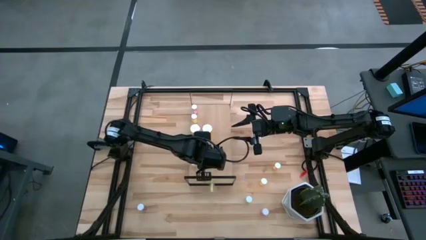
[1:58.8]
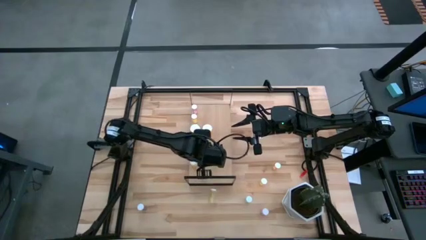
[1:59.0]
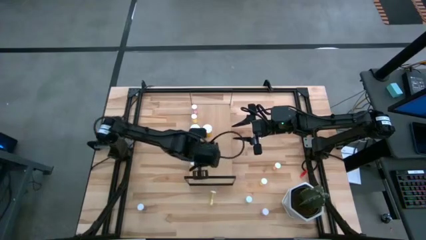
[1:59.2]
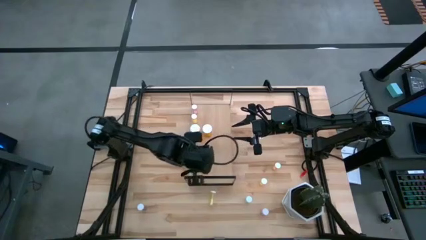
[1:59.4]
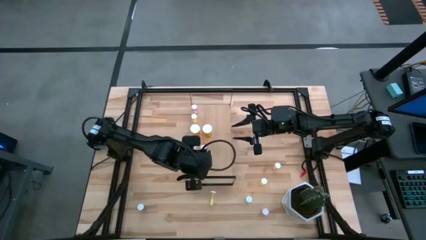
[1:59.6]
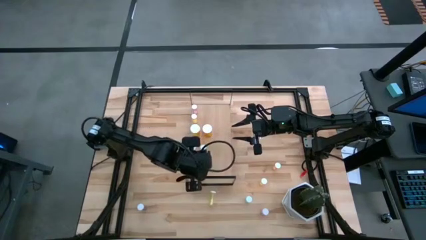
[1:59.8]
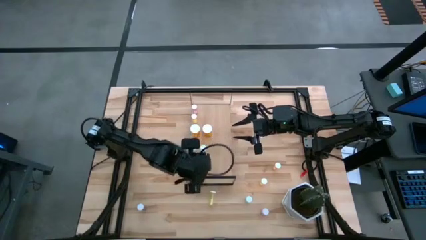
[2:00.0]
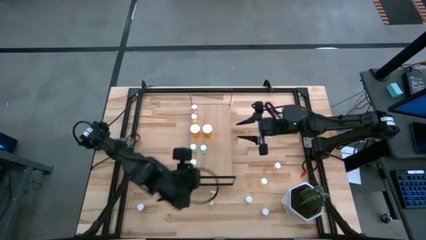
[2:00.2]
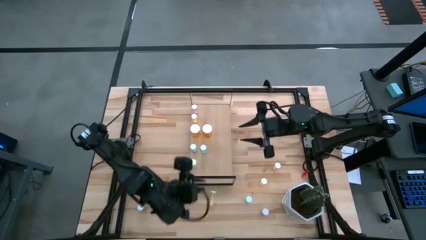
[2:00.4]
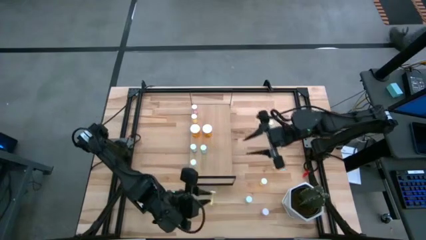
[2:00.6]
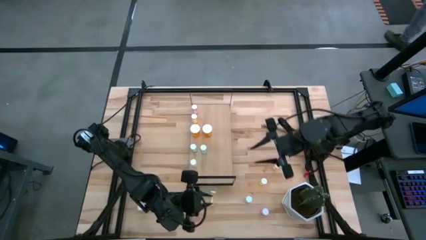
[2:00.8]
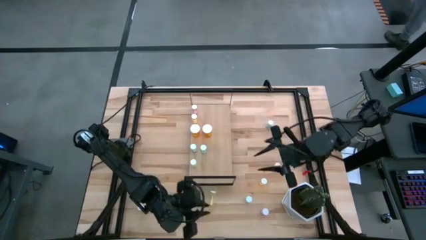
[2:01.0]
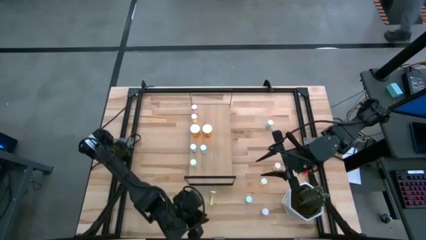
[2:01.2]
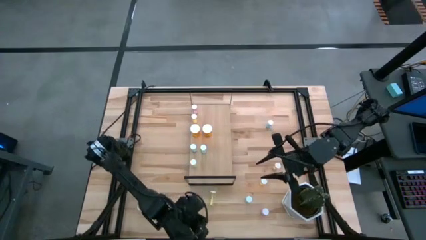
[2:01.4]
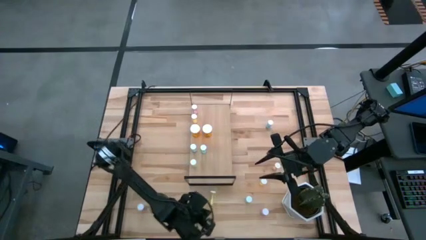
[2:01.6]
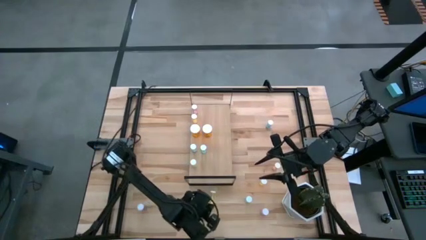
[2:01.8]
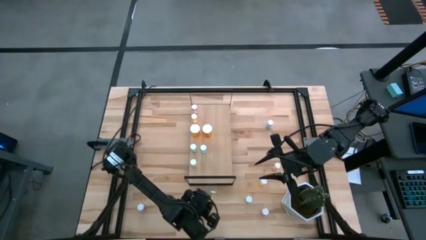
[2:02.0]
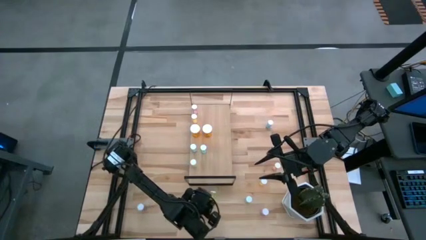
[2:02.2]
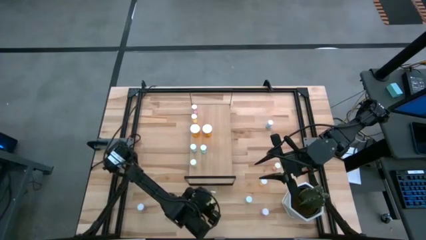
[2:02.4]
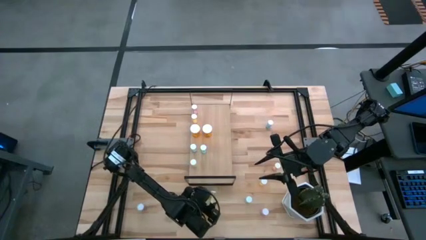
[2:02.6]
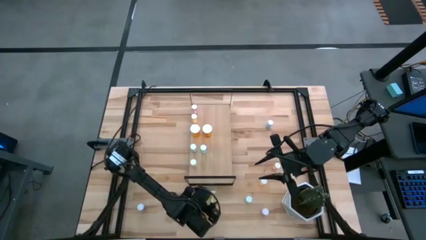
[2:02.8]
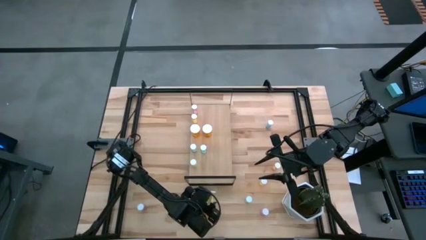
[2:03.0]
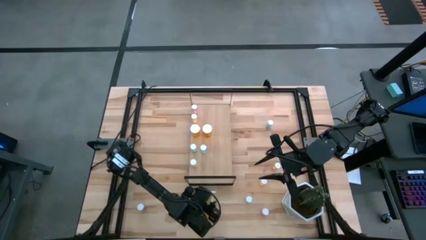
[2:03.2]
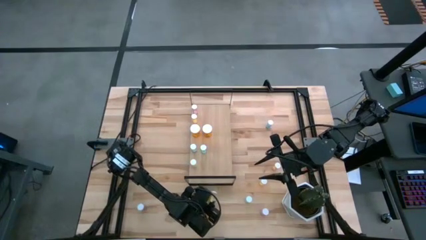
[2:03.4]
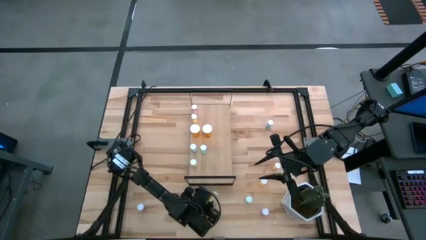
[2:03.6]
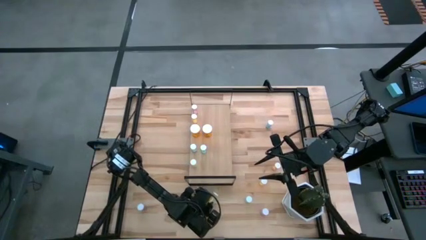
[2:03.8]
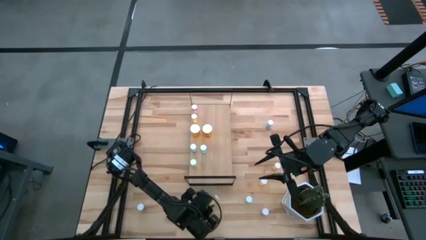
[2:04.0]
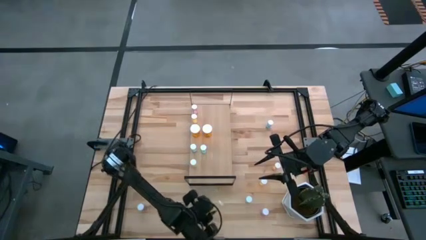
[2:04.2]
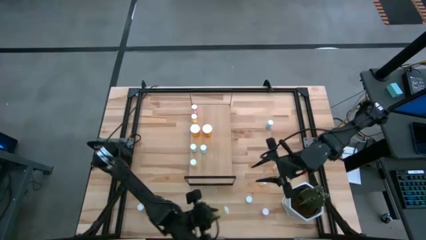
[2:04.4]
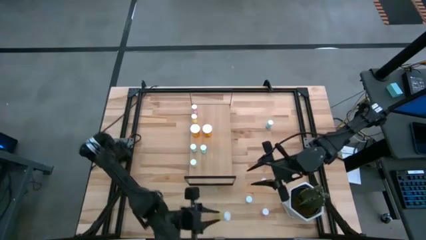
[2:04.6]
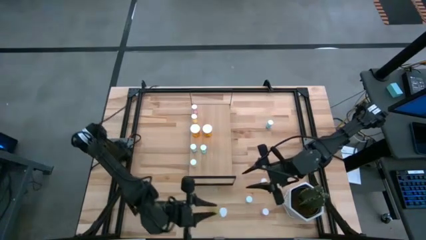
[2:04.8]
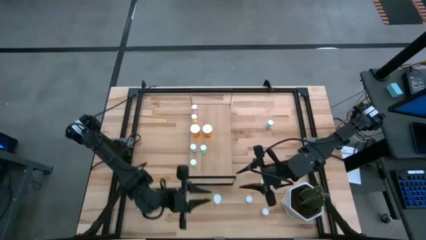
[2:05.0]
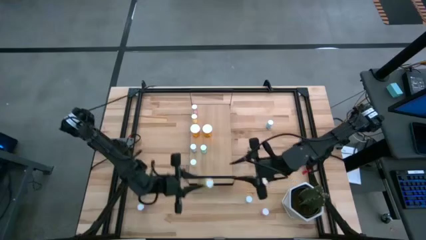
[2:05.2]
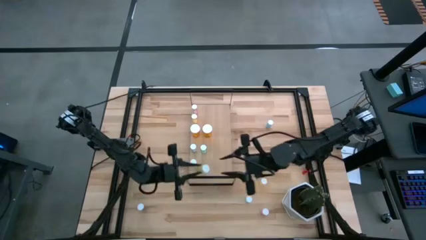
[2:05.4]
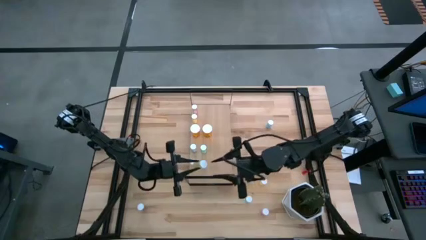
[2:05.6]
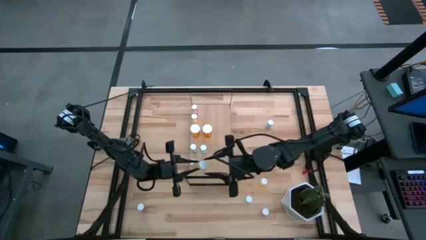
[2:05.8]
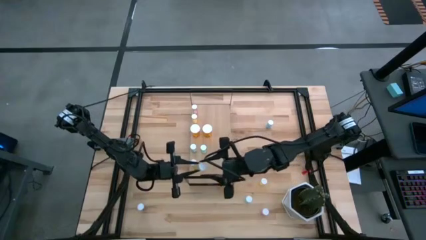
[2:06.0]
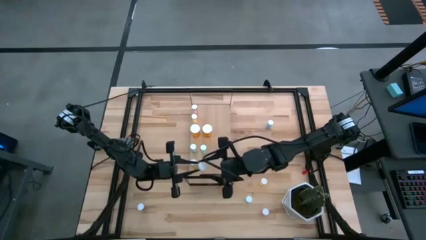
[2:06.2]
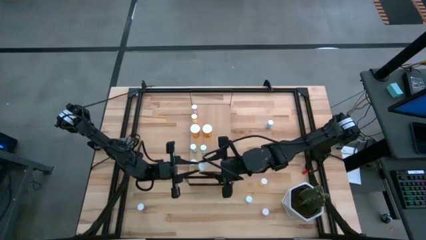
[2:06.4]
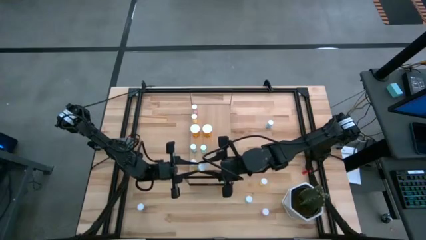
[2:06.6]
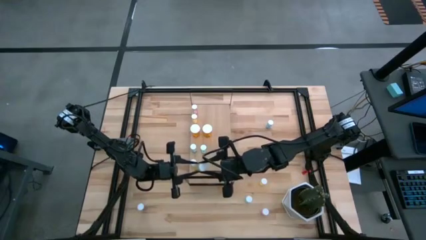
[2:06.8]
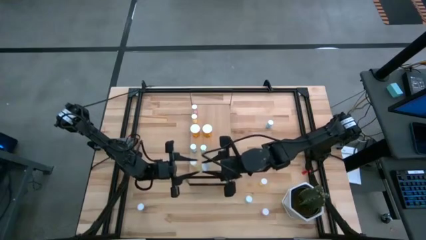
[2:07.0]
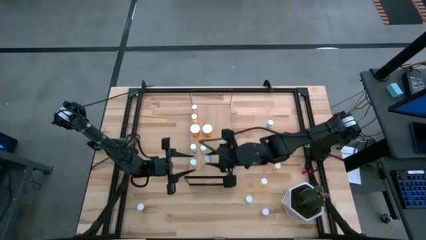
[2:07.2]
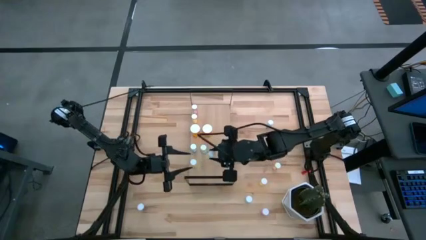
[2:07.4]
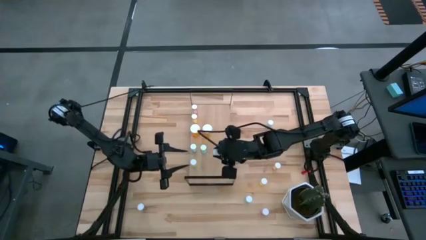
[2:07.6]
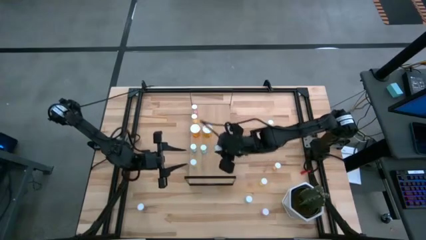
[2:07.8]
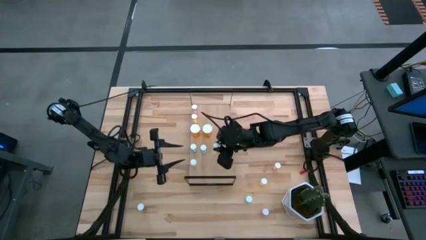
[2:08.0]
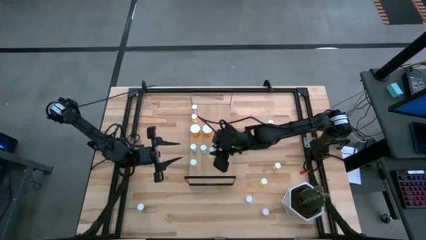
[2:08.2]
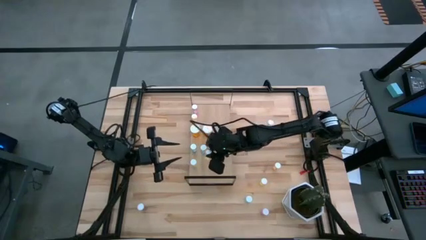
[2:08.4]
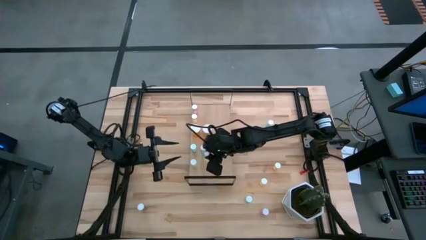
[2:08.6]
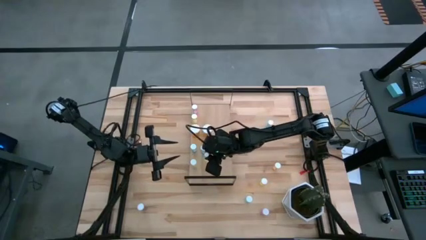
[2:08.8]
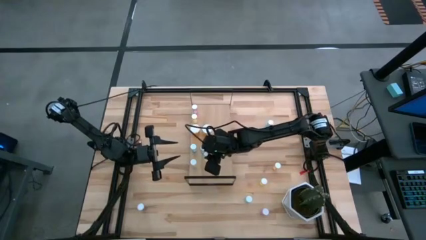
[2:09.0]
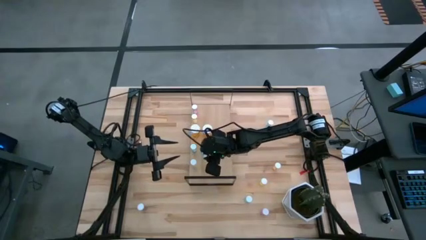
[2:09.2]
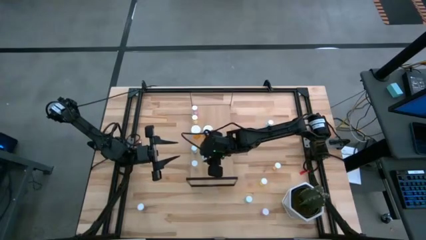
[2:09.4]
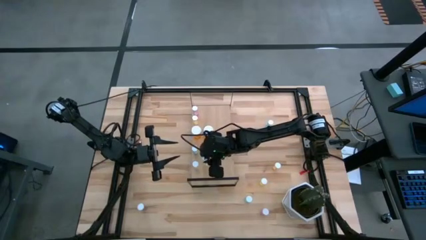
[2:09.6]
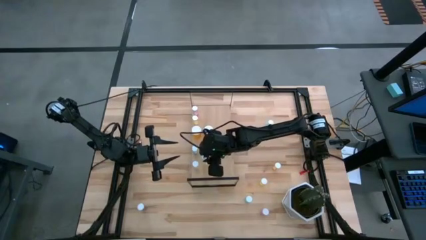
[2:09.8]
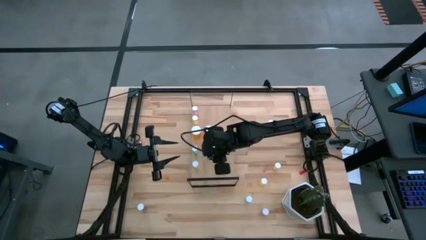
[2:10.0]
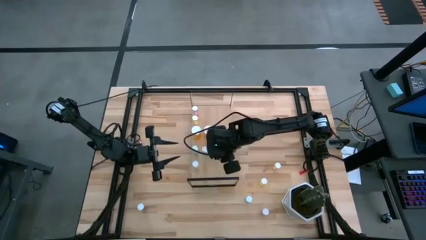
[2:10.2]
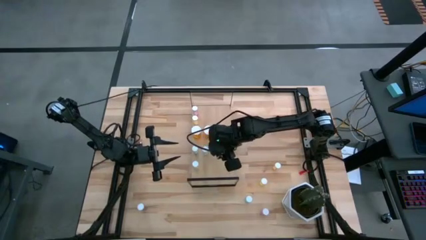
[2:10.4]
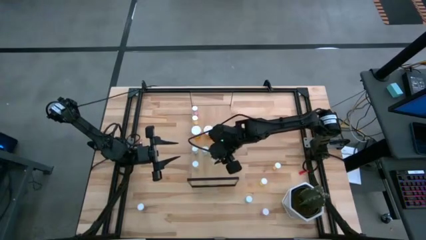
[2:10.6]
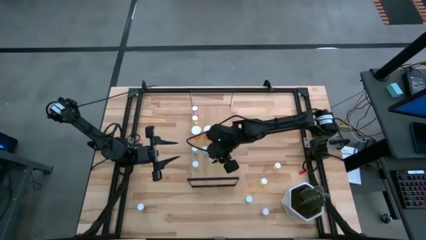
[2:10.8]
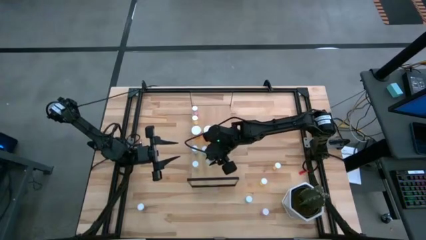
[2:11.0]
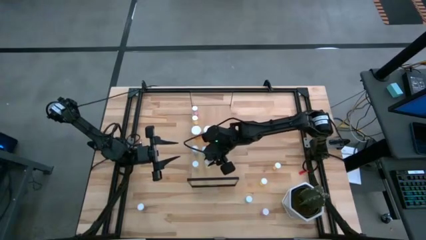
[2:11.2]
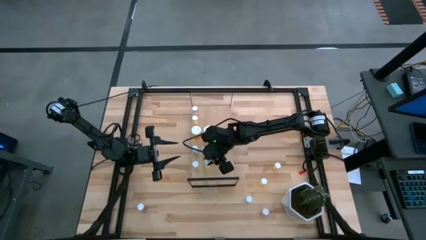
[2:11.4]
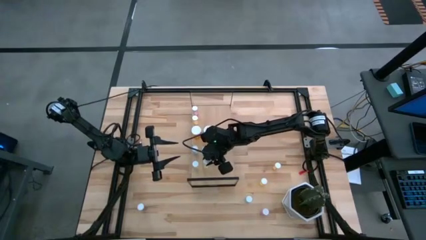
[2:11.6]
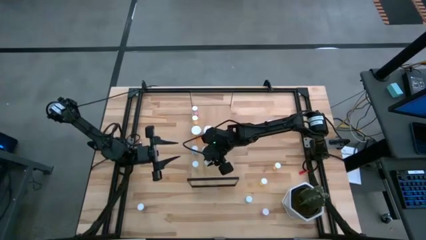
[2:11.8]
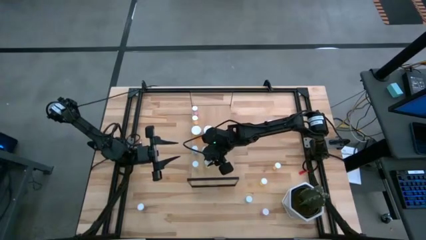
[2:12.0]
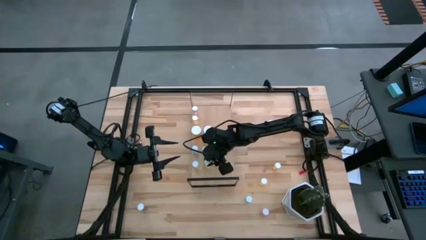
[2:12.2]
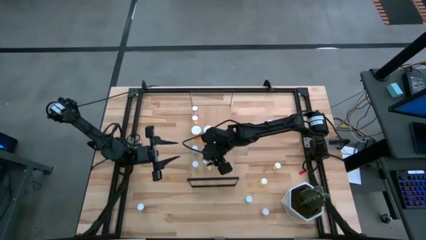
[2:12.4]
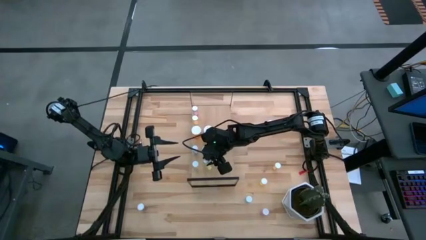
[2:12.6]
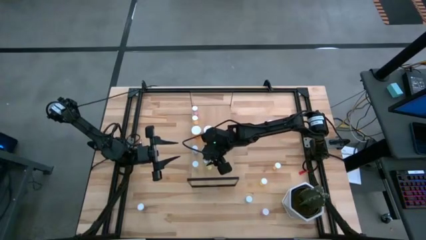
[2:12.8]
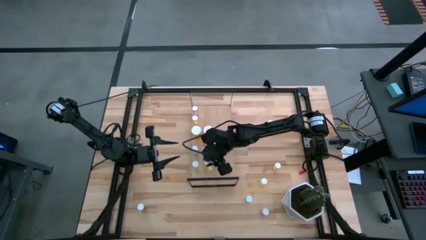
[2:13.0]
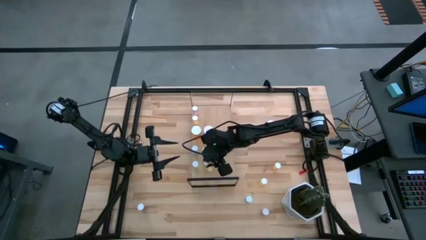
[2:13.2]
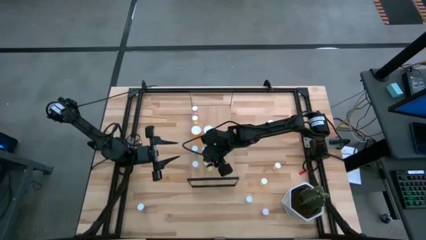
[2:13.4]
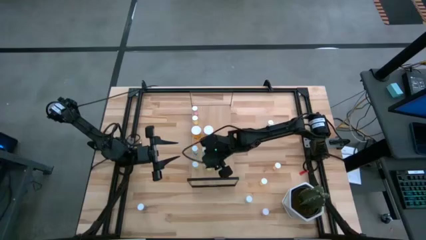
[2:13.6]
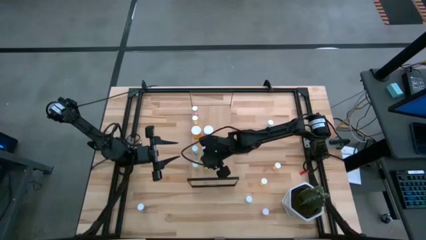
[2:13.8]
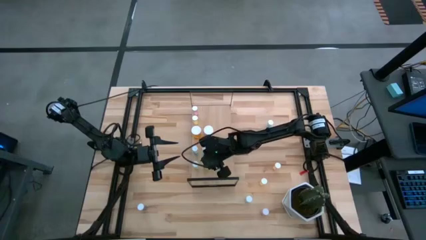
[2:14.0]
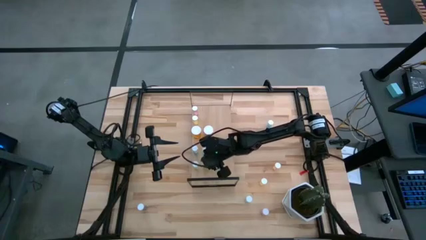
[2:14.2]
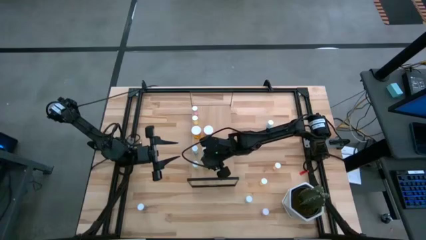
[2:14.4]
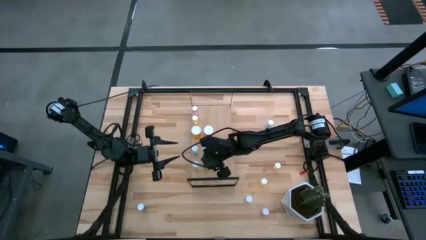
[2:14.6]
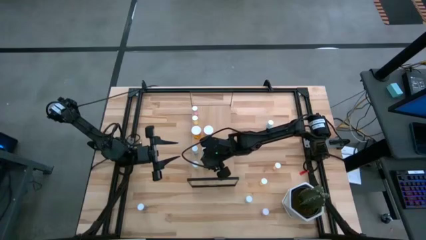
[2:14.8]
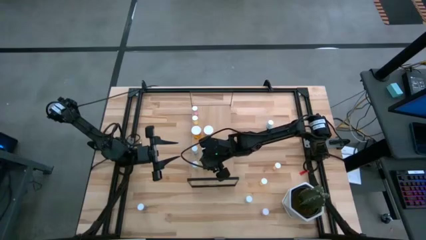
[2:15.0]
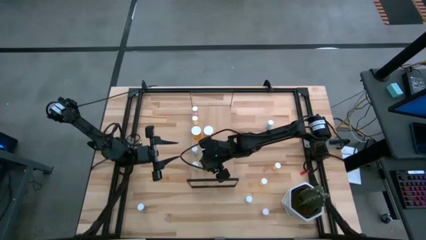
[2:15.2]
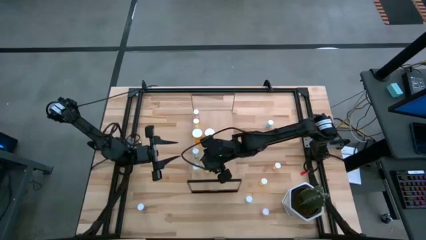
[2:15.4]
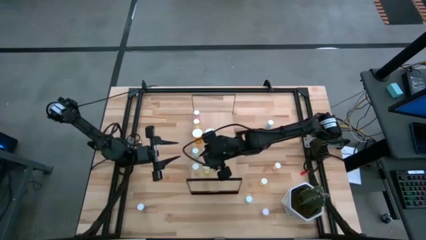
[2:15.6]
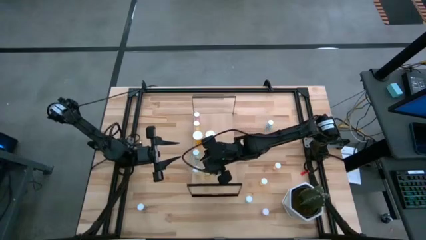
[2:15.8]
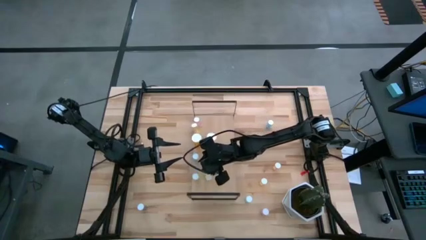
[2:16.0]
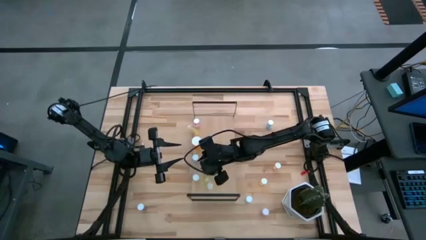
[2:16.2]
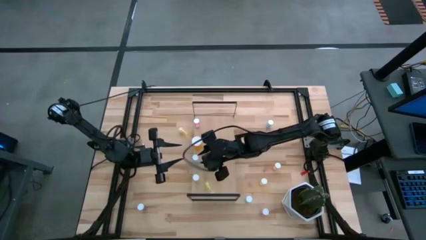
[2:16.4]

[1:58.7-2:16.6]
Task: Pick and place medicine bottles onto shelf by color
Put the yellow pill bottle aligned with the other yellow pill bottle on the shelf

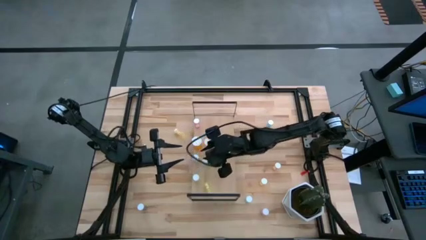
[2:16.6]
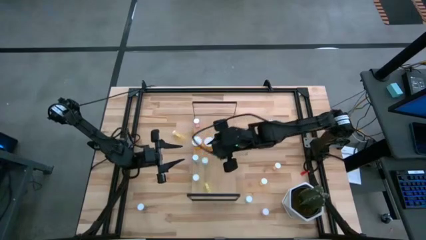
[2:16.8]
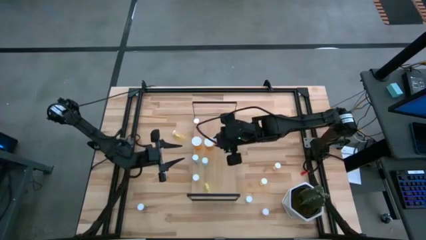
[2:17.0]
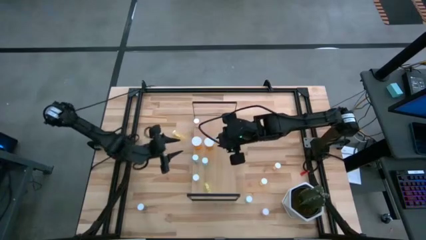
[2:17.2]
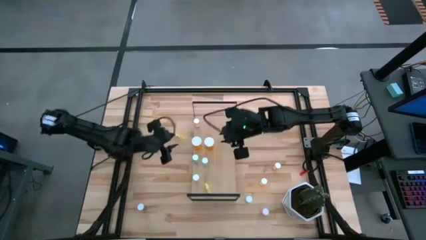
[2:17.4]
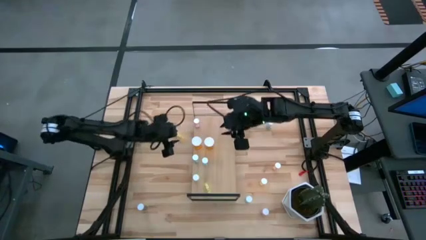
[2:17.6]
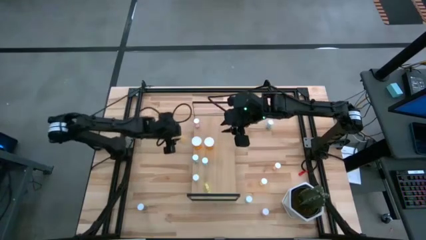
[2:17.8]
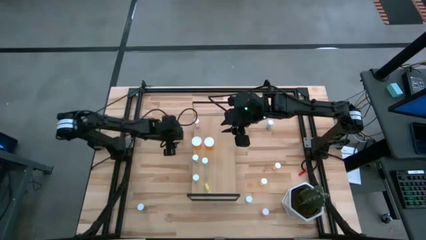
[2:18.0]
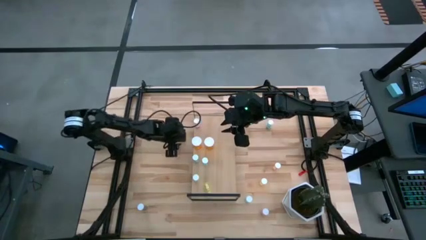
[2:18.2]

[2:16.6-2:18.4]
Put the yellow pill bottle on the shelf
